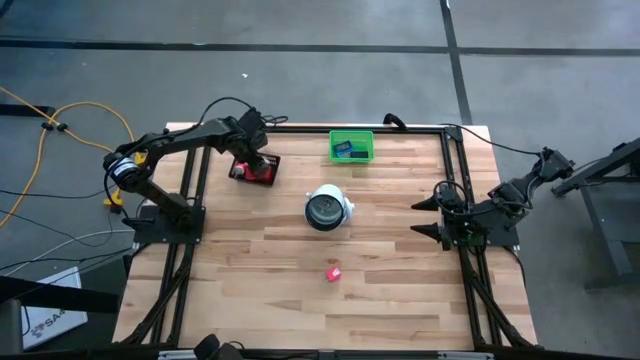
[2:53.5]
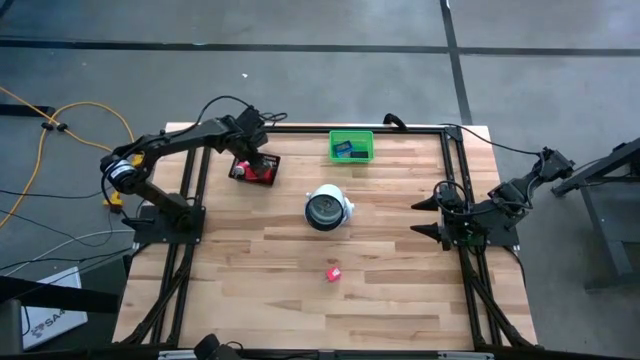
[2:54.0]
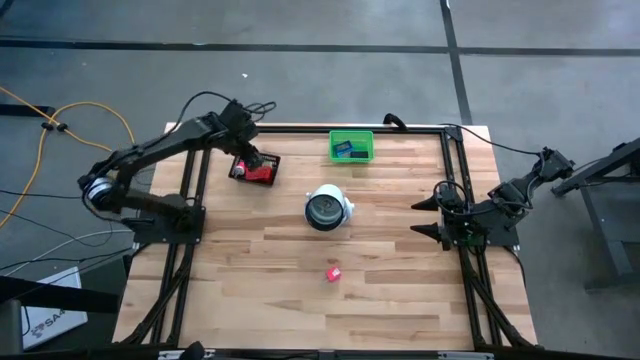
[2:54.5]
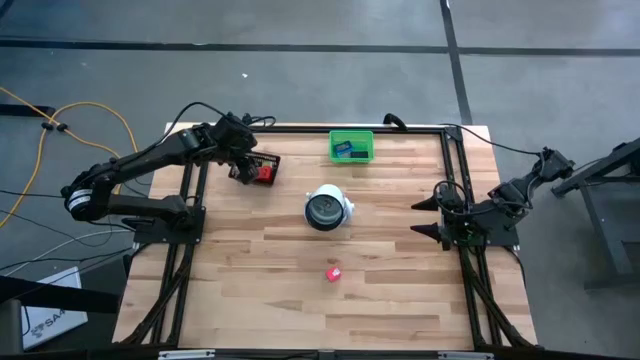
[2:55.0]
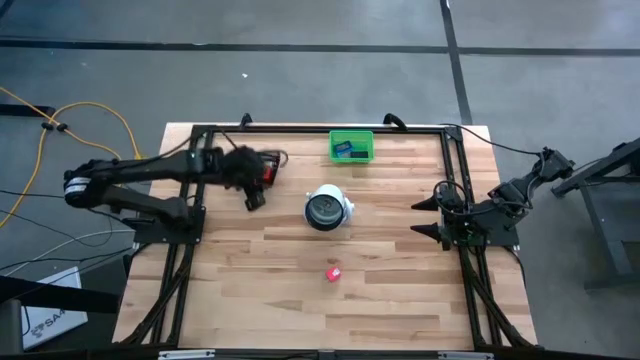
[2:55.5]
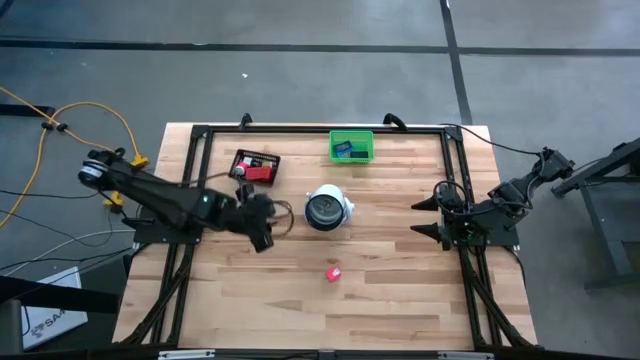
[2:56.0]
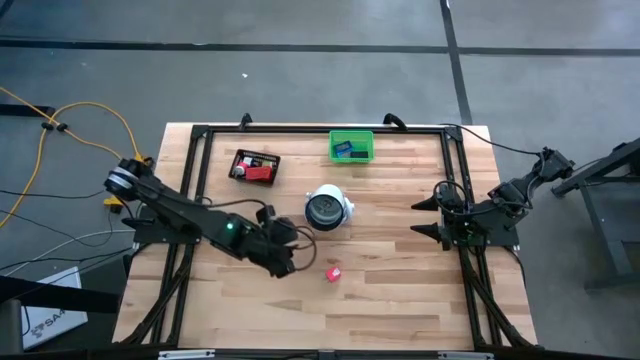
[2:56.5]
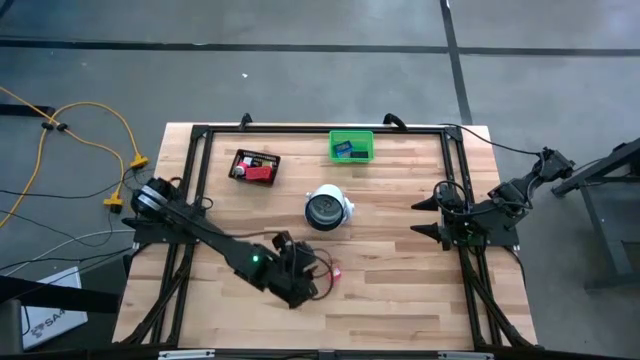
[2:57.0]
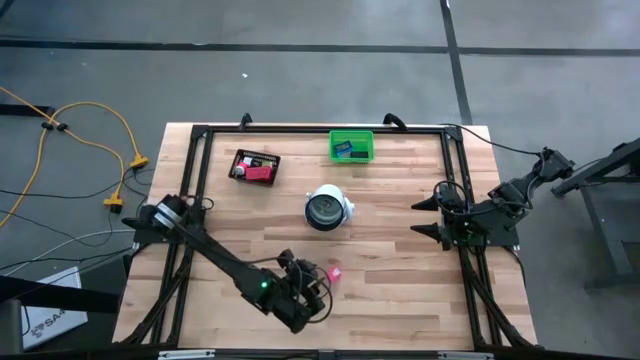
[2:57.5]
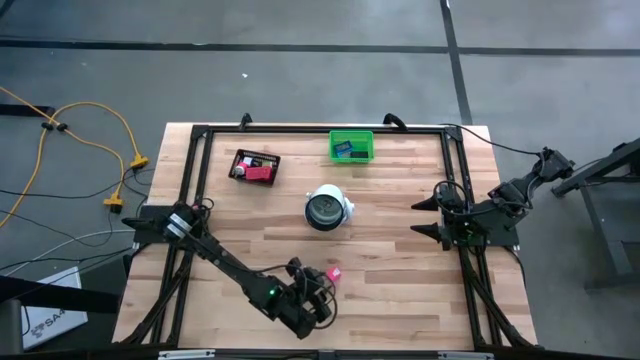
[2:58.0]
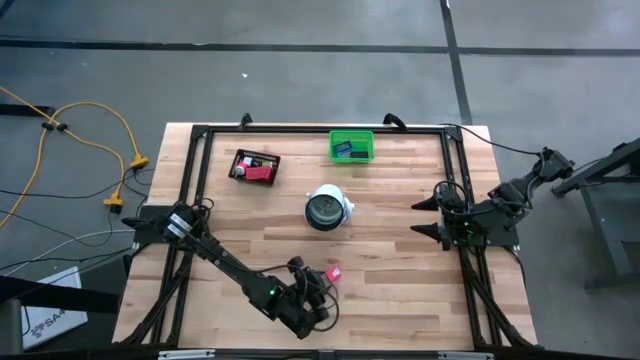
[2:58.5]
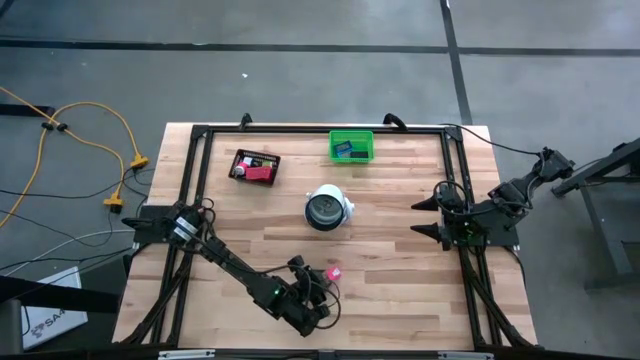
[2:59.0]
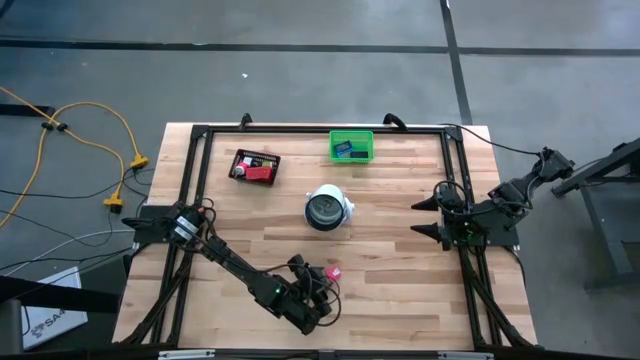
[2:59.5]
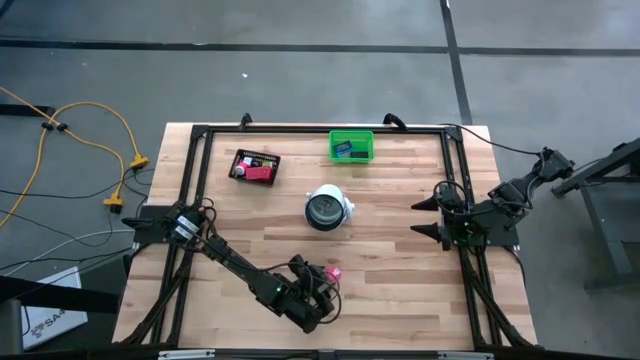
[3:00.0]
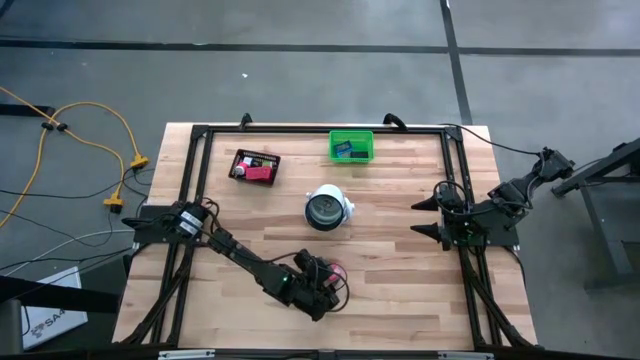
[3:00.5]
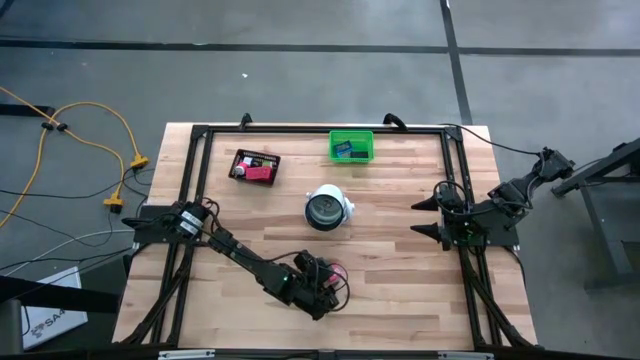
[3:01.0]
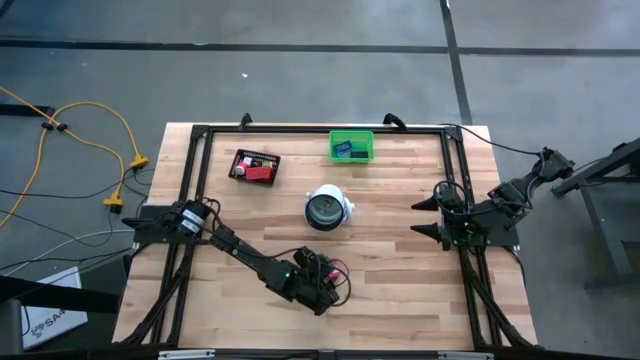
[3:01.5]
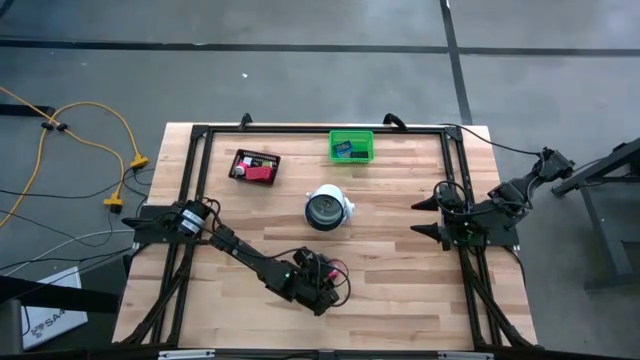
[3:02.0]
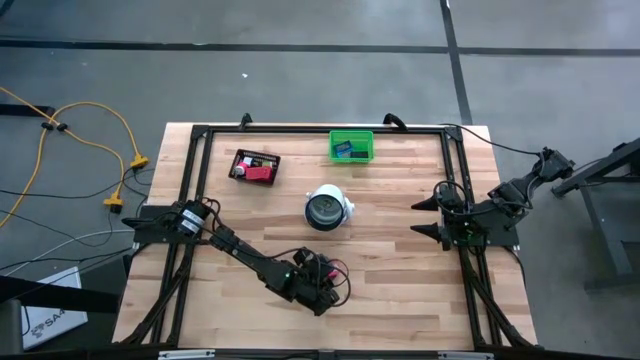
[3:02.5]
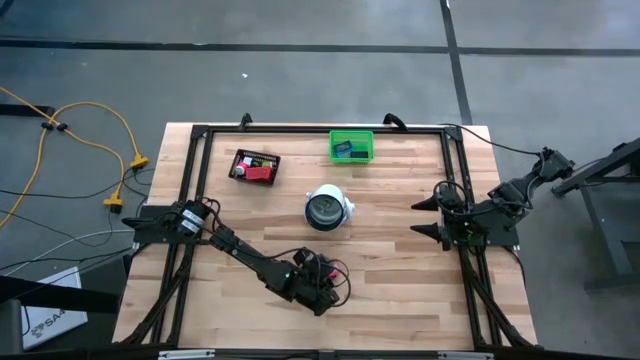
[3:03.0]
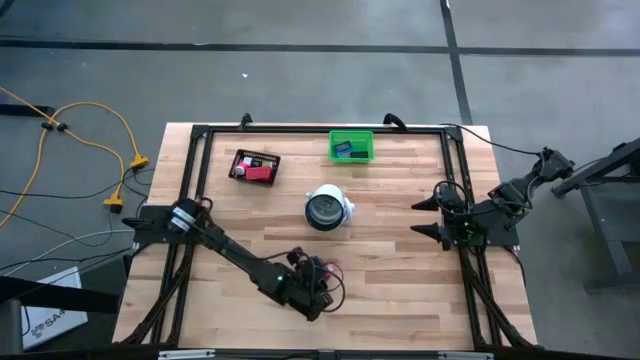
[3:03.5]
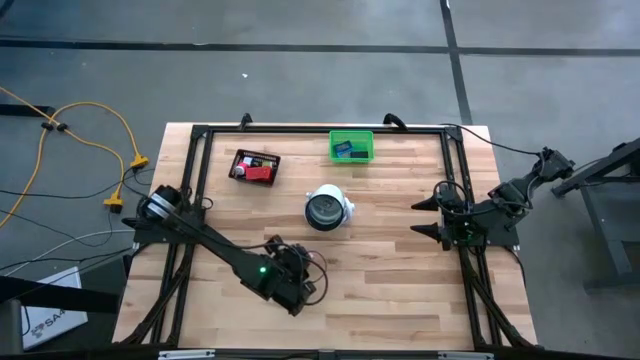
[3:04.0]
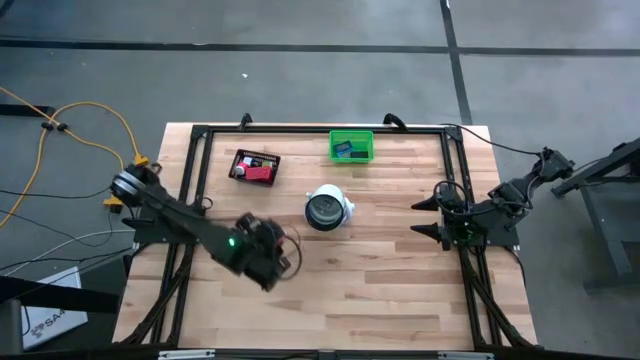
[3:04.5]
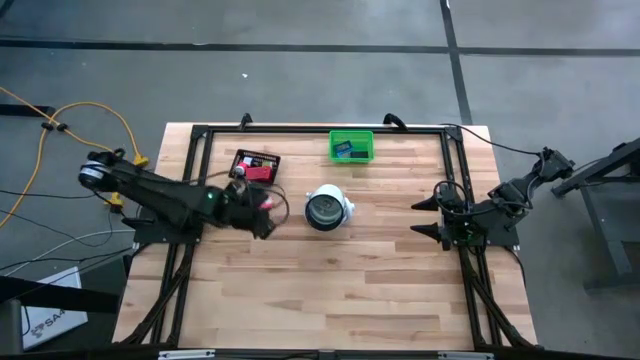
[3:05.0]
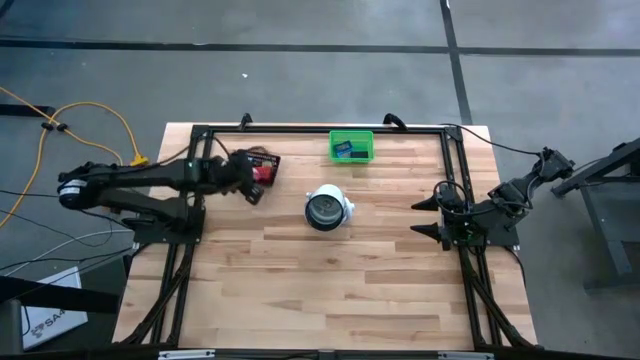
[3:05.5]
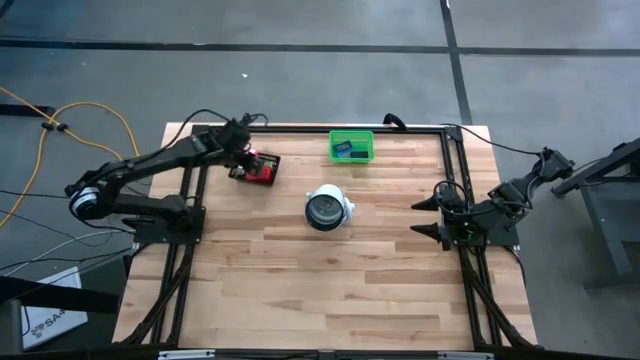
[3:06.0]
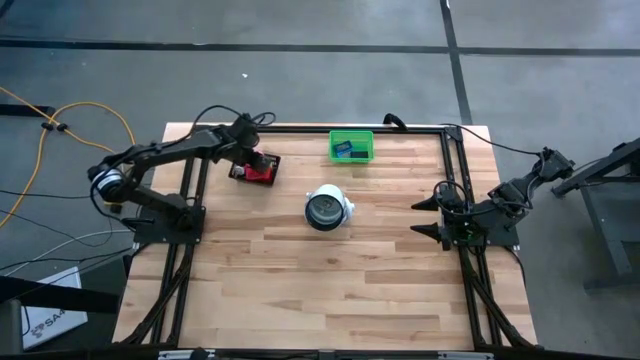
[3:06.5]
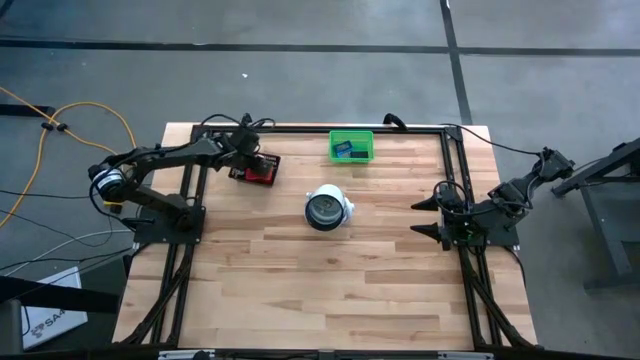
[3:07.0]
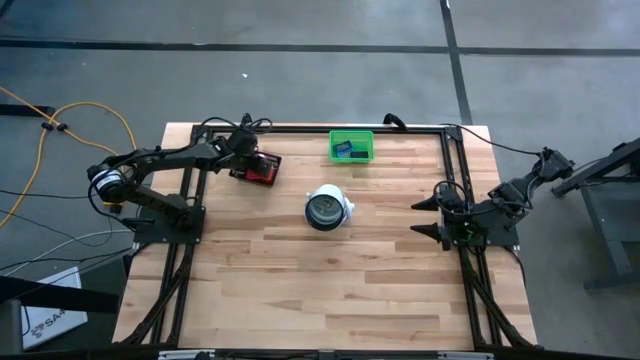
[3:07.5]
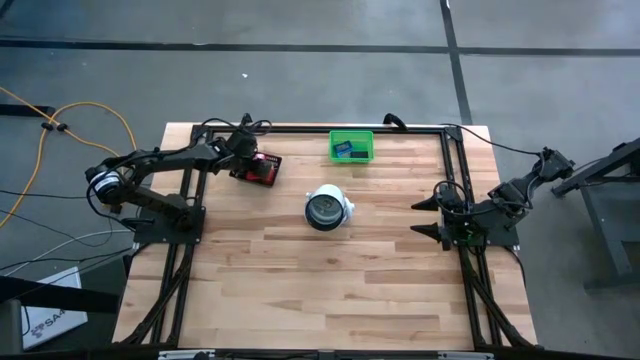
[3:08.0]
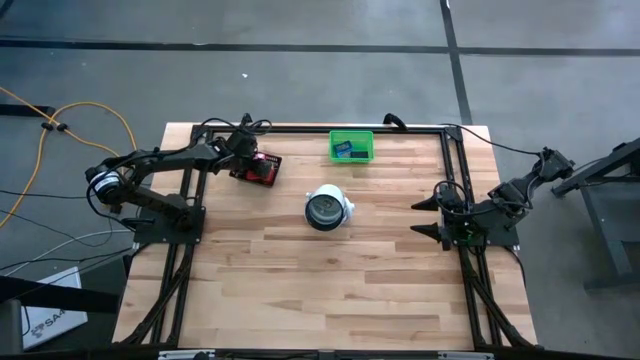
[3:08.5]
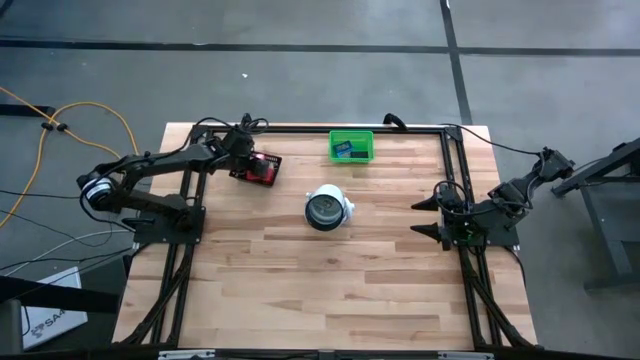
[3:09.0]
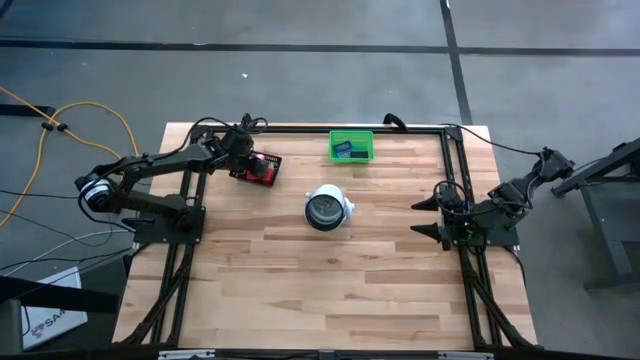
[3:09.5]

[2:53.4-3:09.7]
Task: Pick & Place Office items
Put the pink charger adapter into the black bin

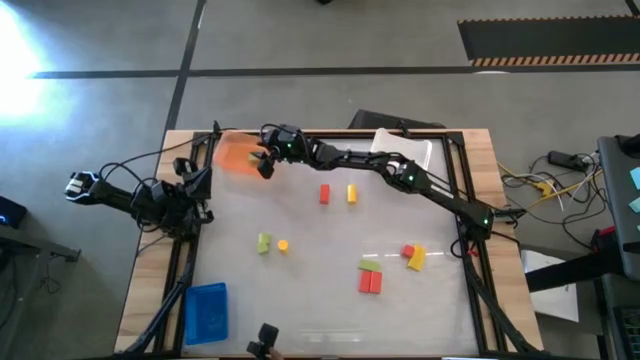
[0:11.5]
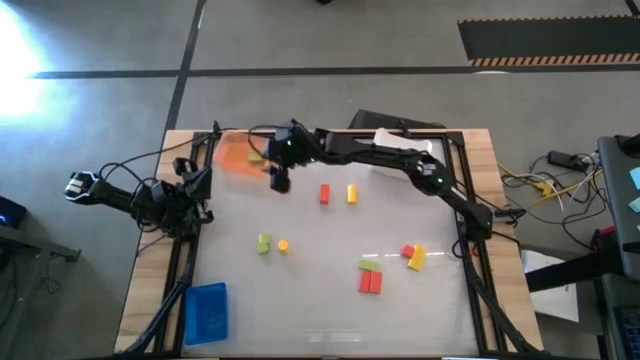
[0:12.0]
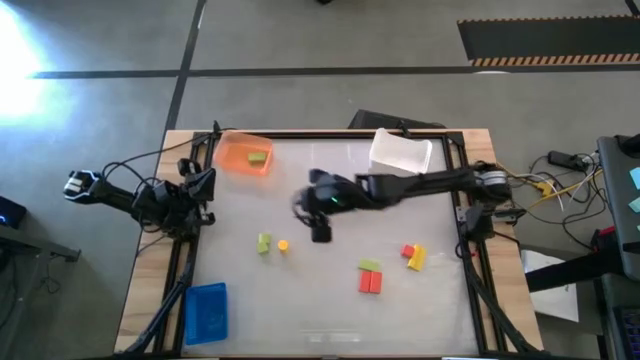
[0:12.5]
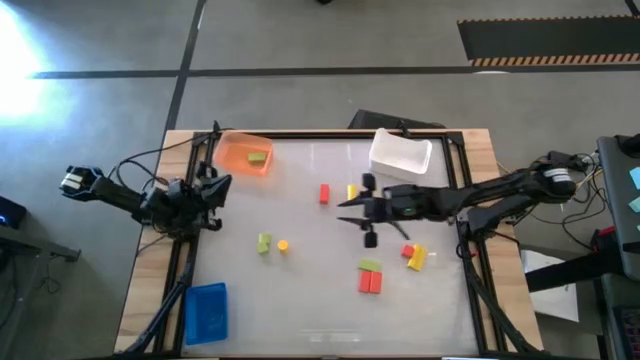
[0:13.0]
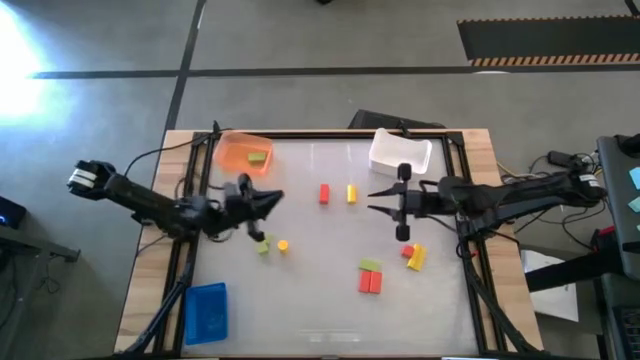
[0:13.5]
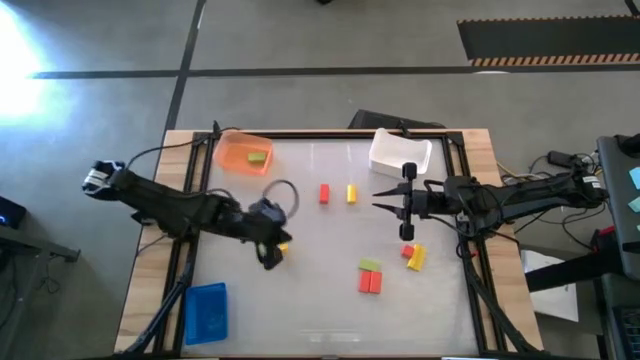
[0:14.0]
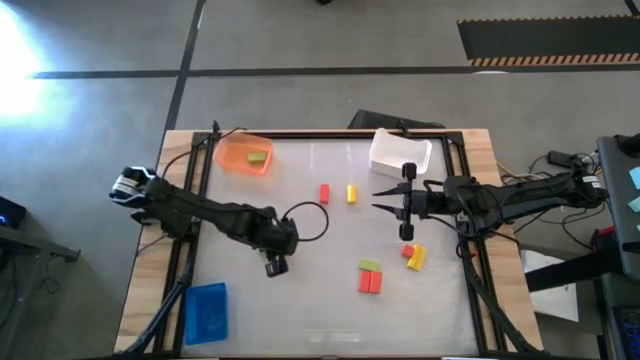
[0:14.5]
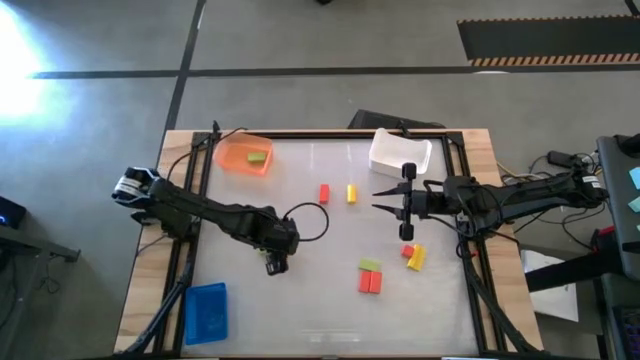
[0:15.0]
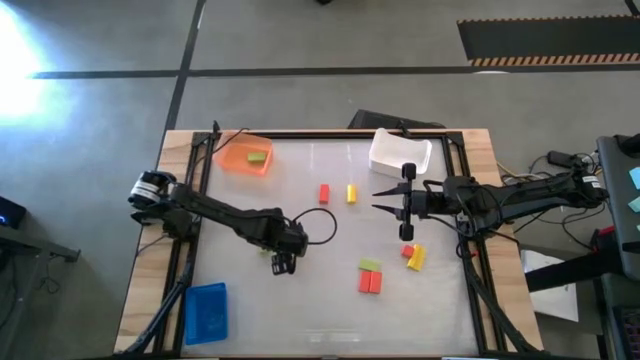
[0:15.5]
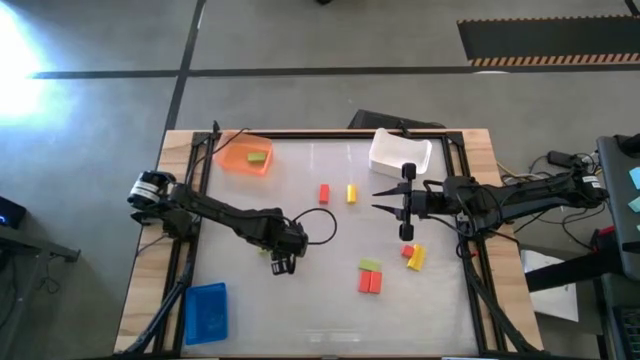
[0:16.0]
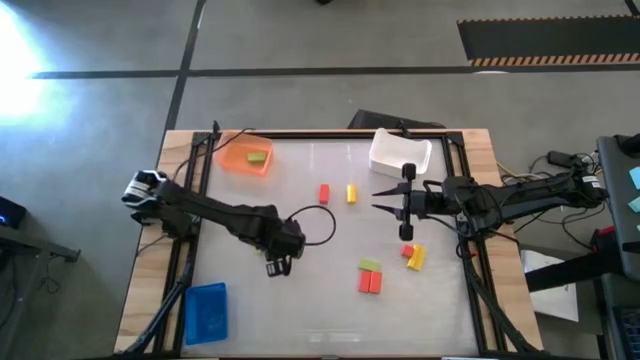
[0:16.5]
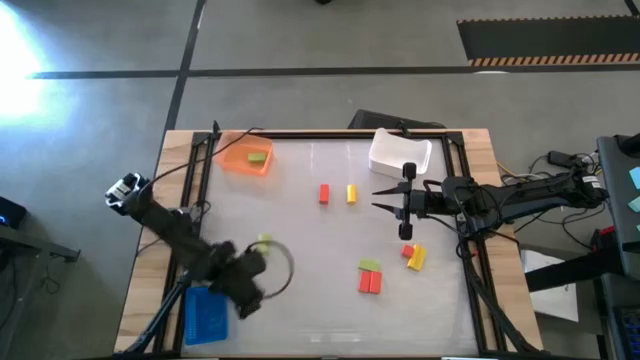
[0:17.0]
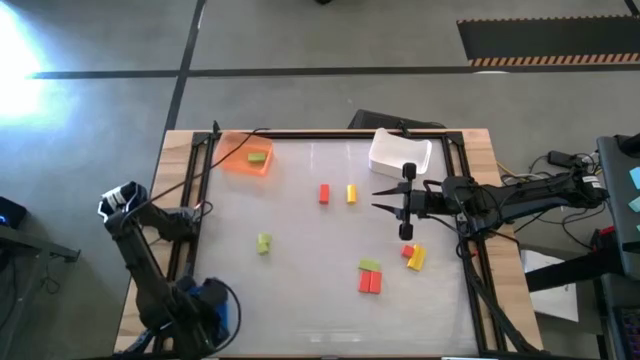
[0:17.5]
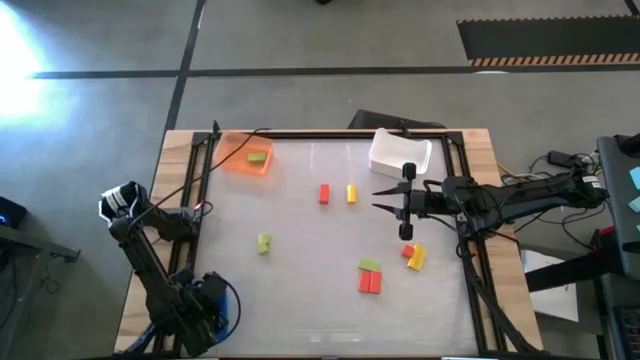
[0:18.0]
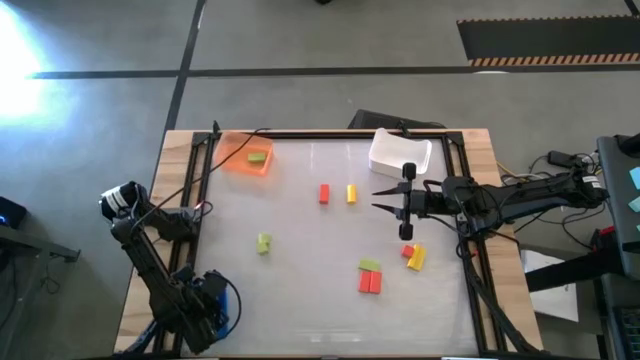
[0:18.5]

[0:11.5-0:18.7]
Task: Sort & place blocks by color
Put the left yellow cylindrical block into the blue basket
